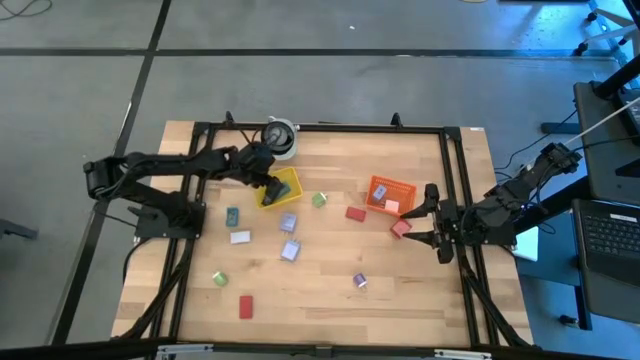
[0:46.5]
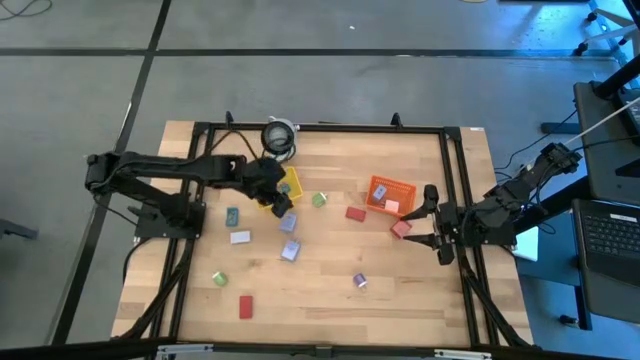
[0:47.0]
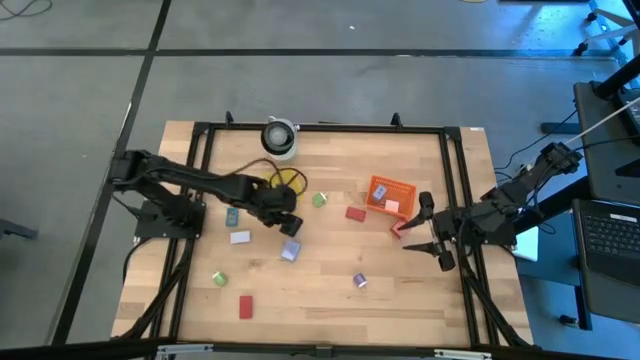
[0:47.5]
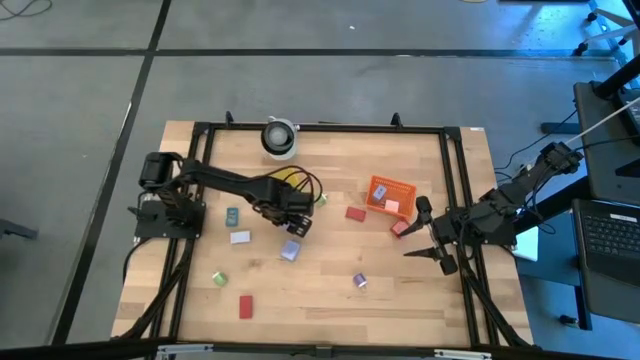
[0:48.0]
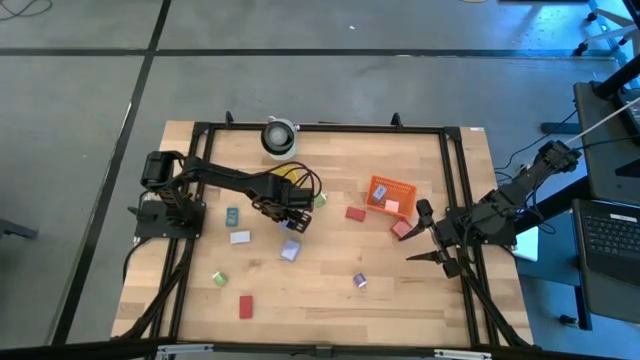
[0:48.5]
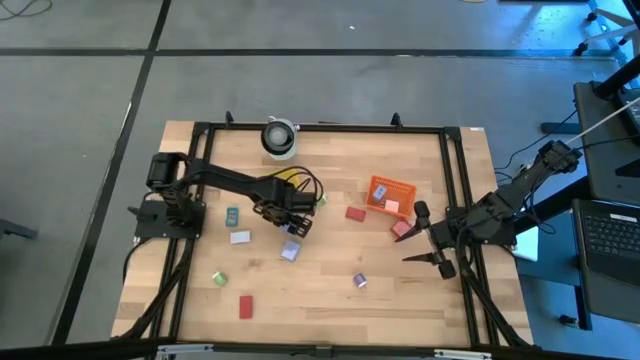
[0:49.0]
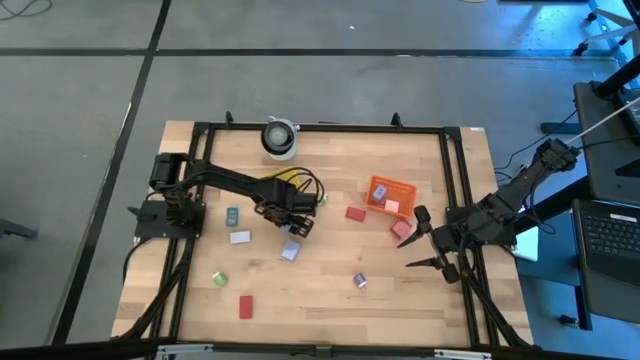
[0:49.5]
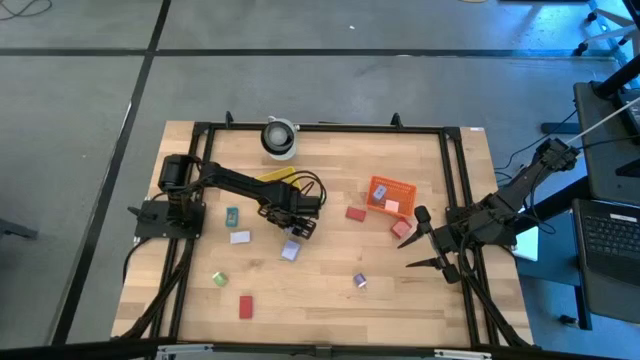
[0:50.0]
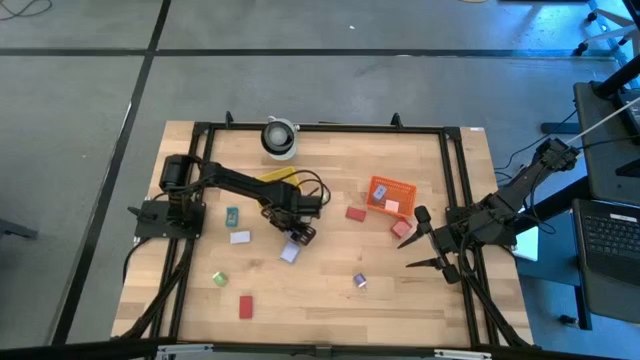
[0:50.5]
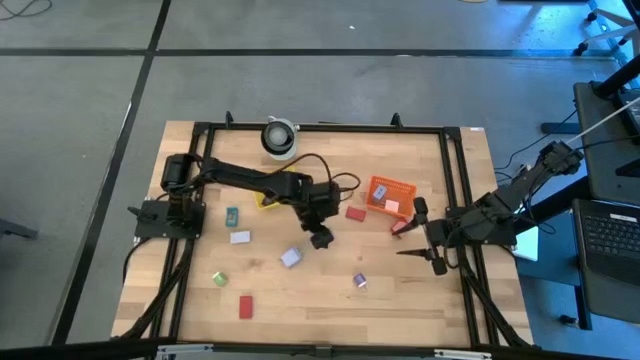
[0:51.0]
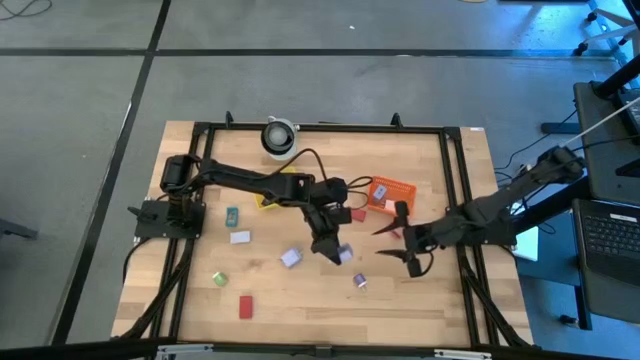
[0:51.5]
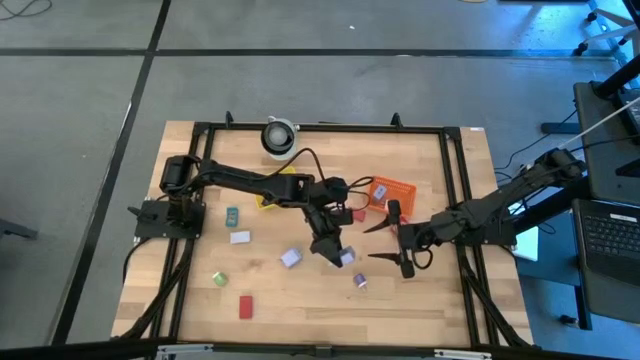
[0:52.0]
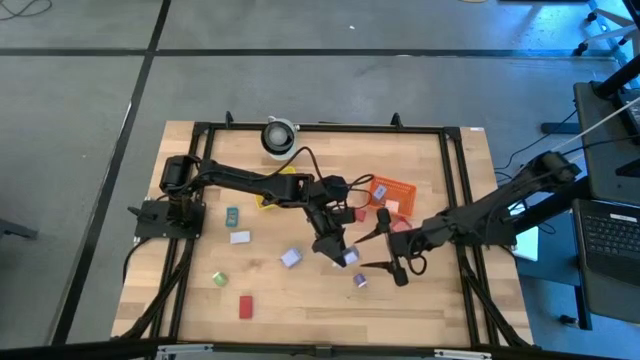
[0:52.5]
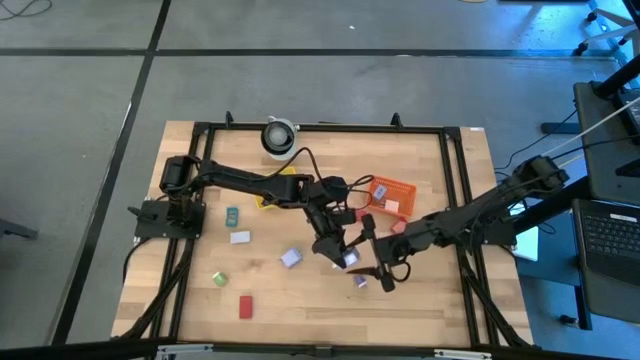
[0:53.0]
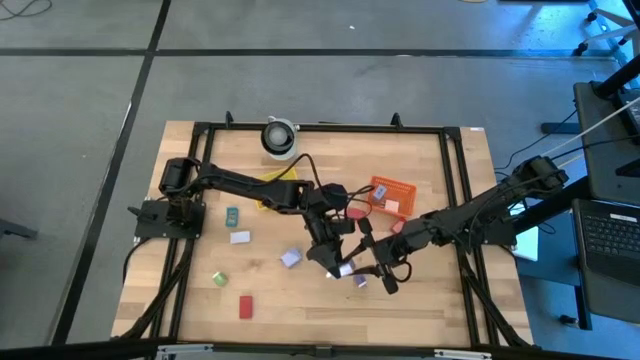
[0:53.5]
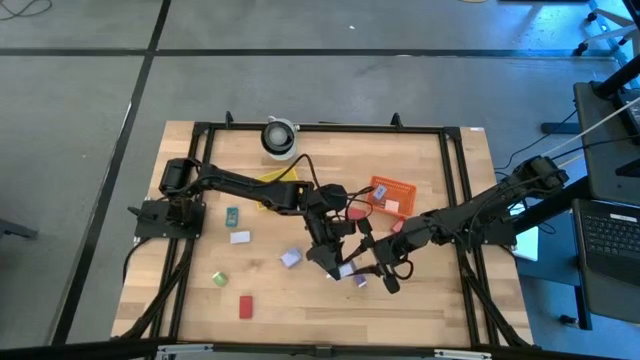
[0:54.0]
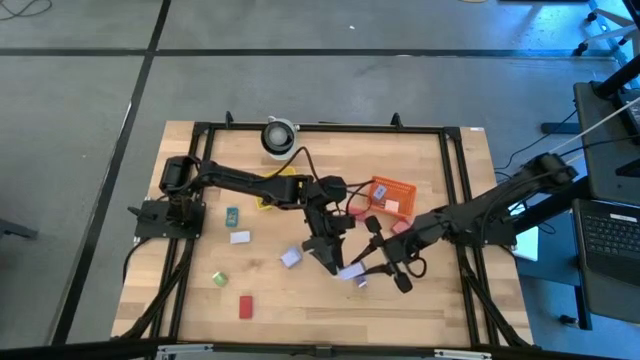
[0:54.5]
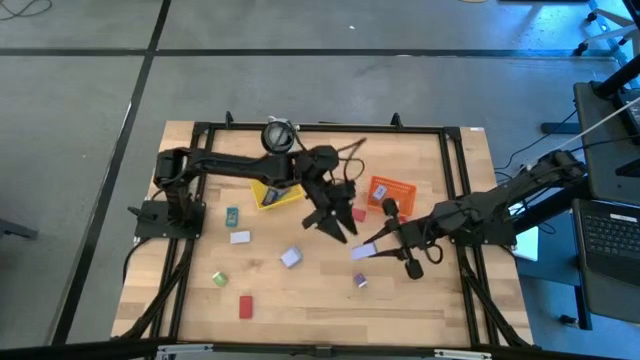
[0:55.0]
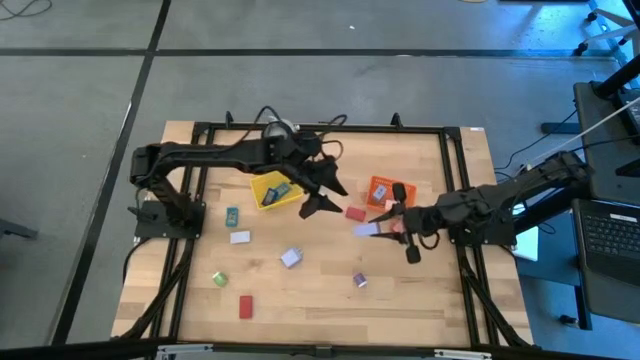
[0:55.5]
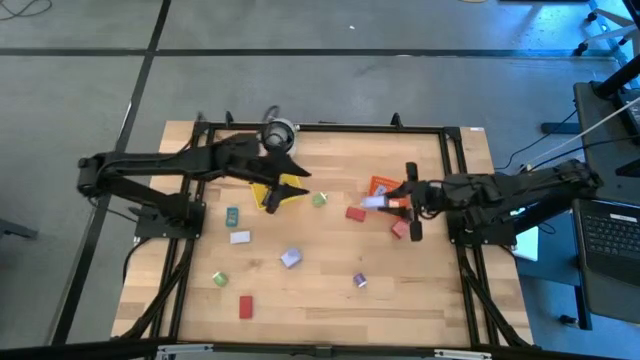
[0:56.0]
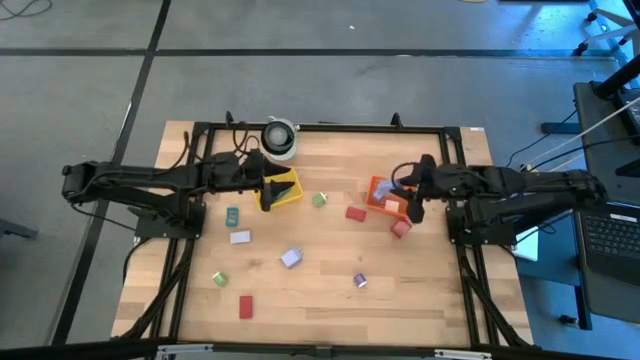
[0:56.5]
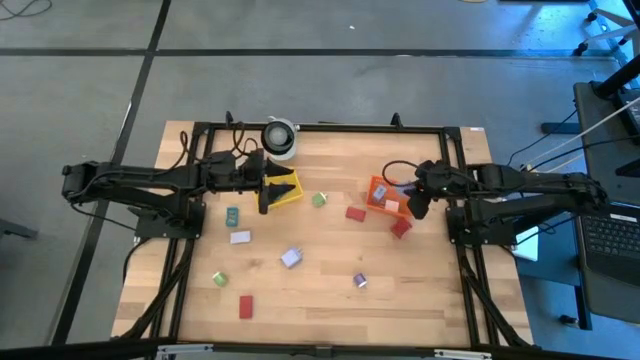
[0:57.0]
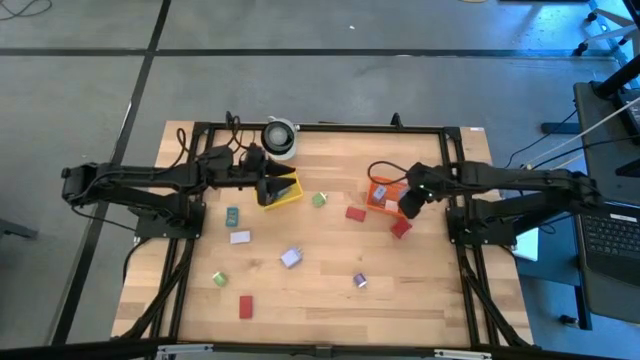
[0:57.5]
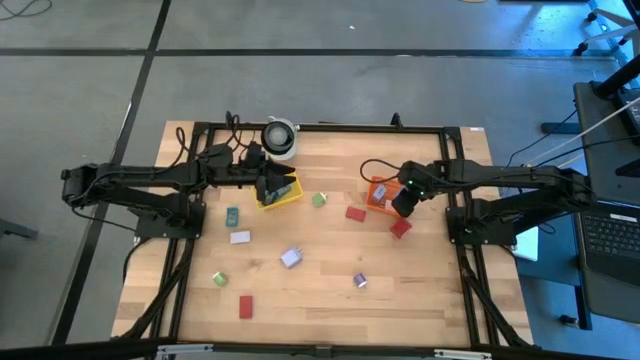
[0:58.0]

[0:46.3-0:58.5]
Task: Pick & Place Office items
Put the top light blue charger adapter into the orange bin
